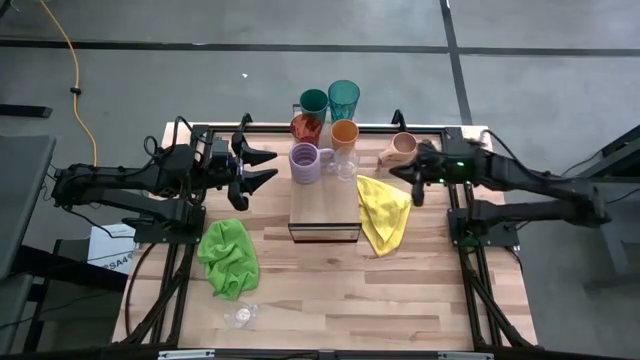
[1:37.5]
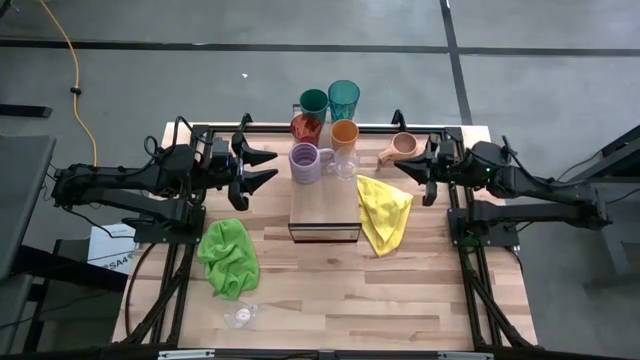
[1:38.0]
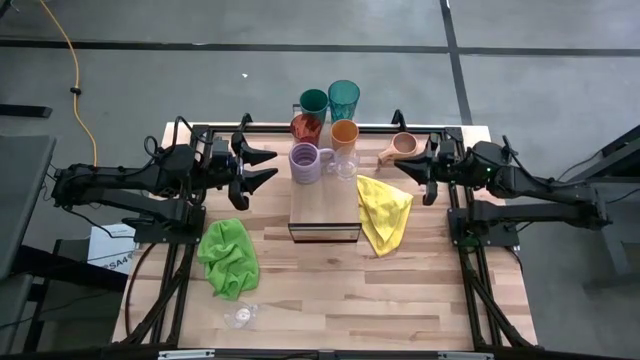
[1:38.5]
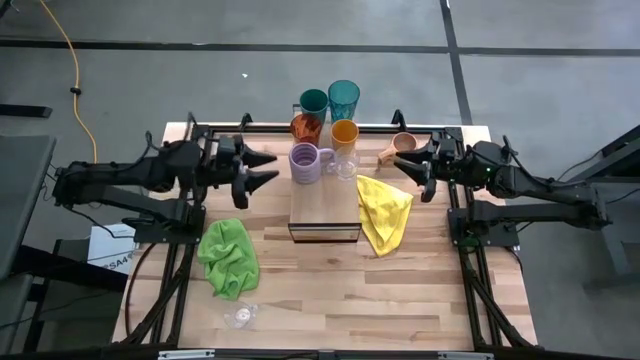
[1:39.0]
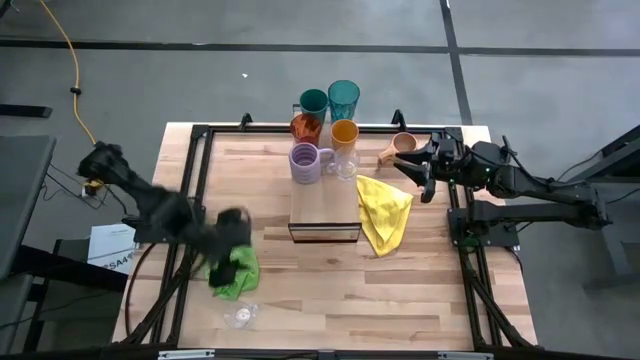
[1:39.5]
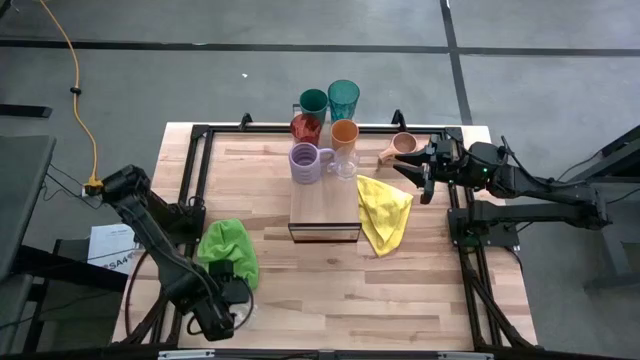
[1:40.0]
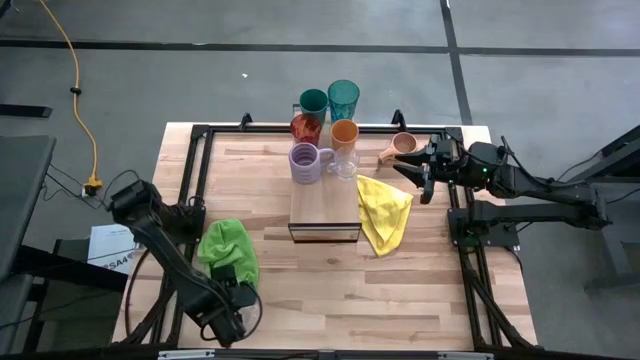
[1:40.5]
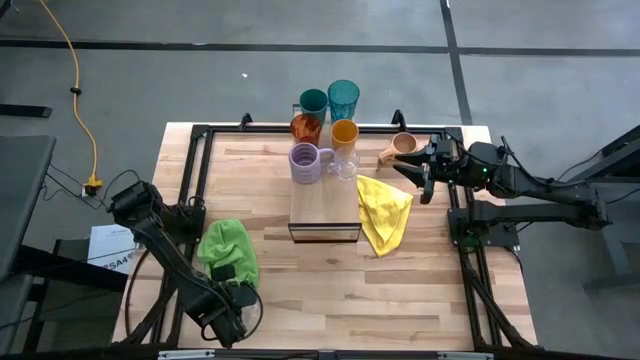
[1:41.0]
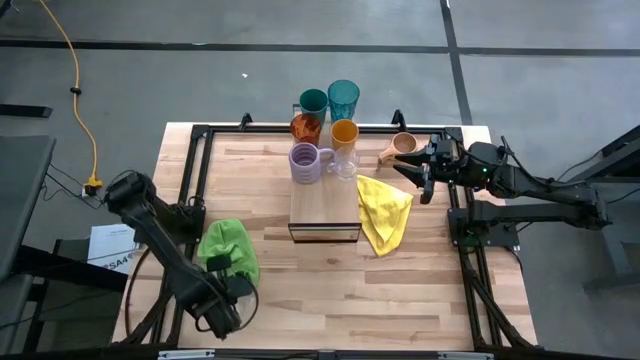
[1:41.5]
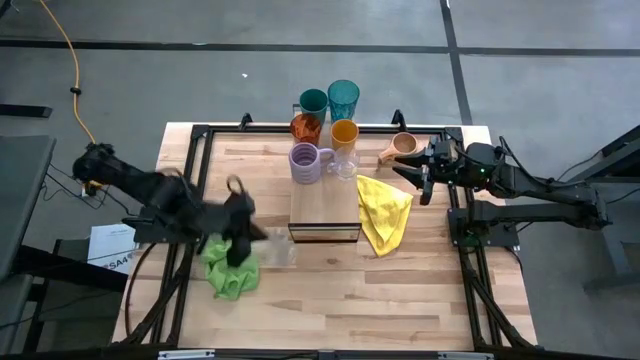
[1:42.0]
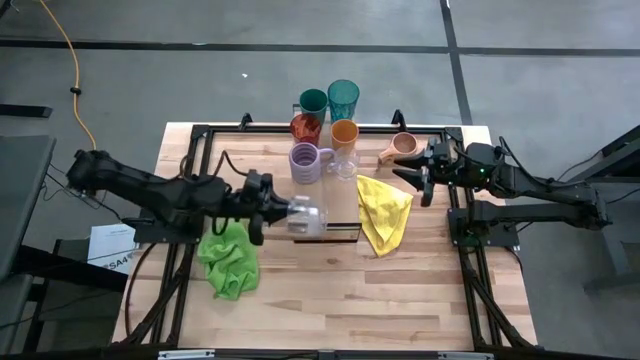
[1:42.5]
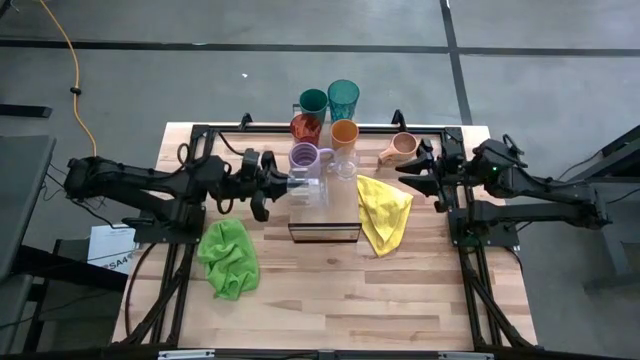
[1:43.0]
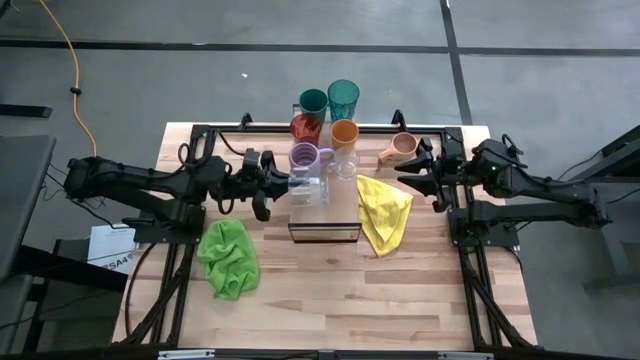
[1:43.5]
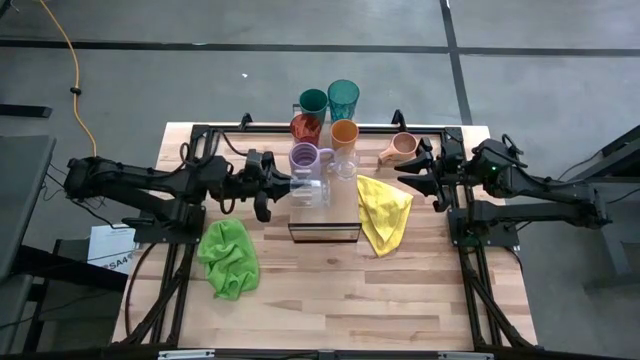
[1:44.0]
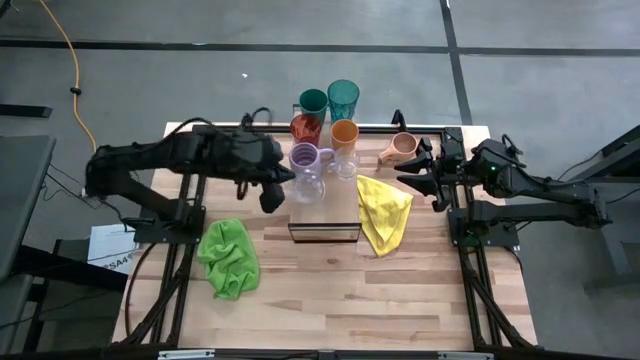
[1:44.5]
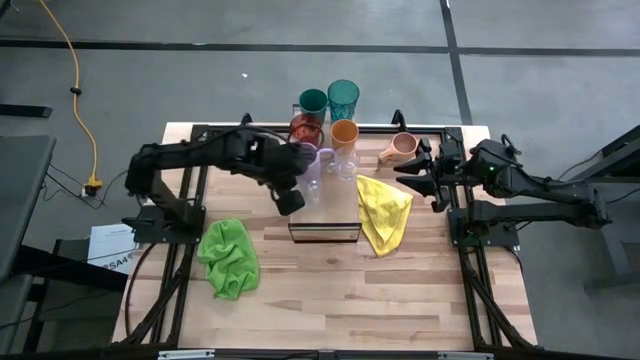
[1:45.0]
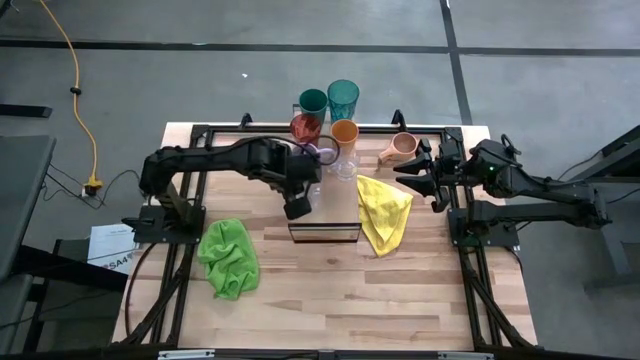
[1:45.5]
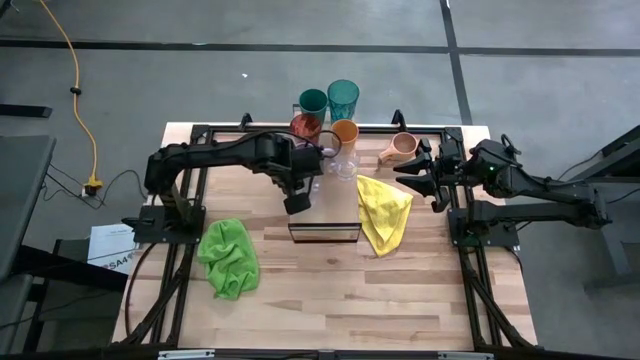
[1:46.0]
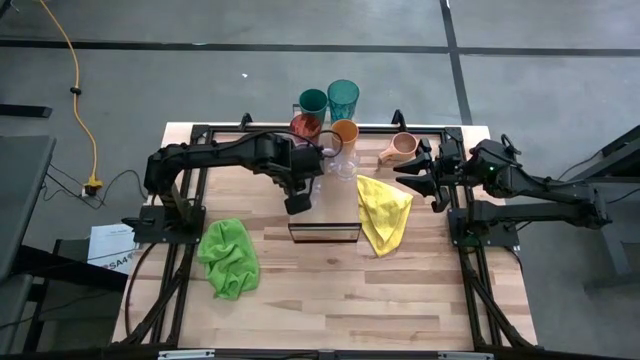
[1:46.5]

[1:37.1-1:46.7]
Task: Stack small to large cups/mugs on shelf
Put the transparent cup on the shelf

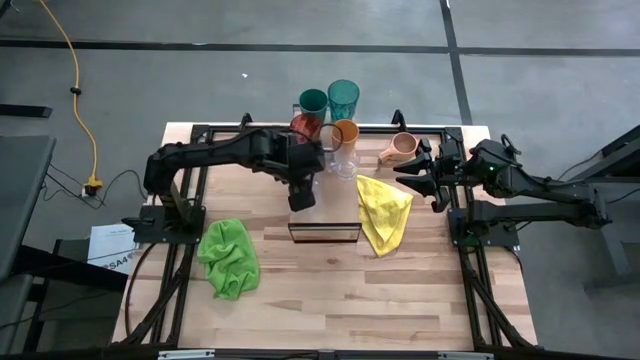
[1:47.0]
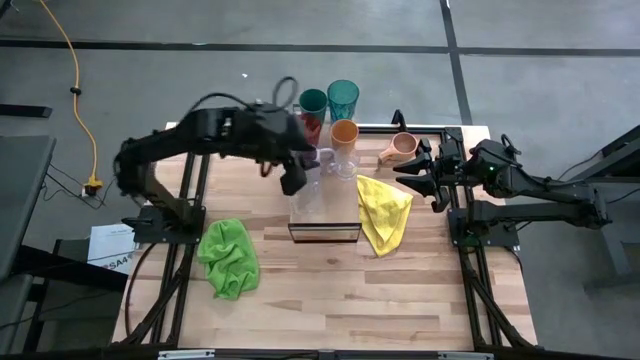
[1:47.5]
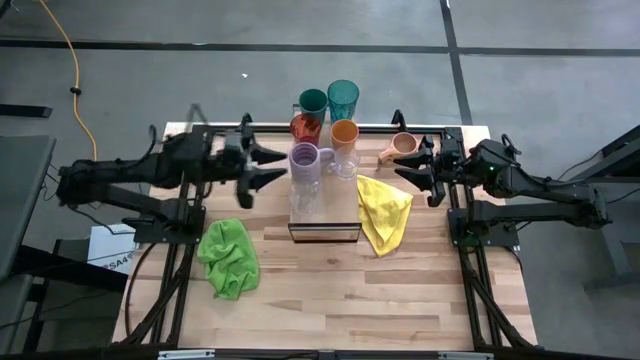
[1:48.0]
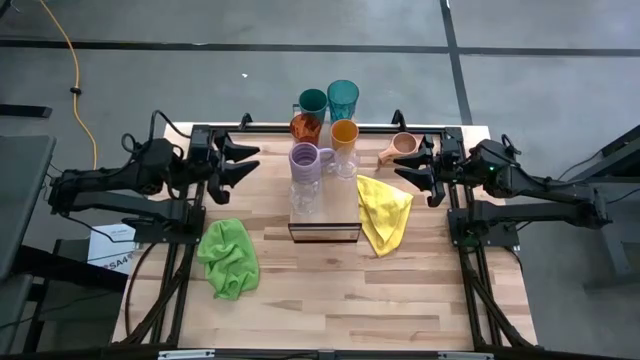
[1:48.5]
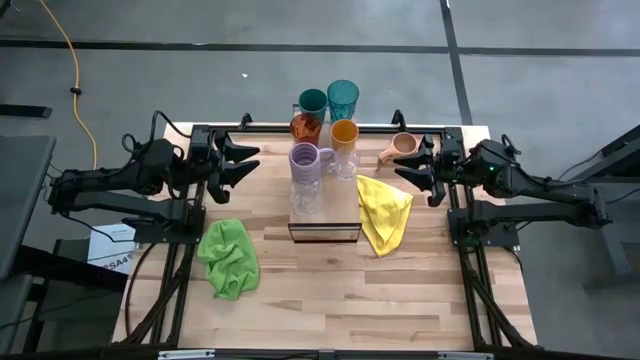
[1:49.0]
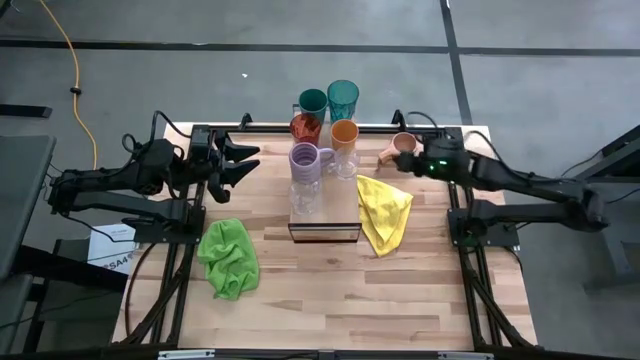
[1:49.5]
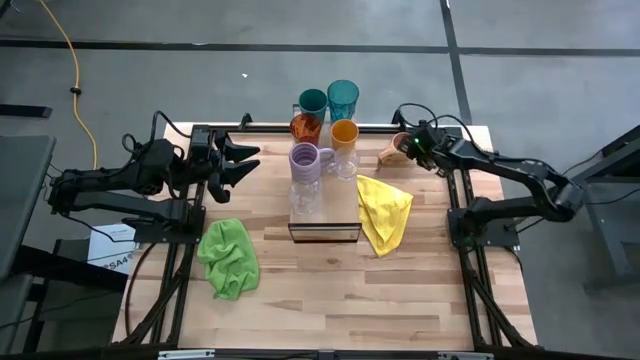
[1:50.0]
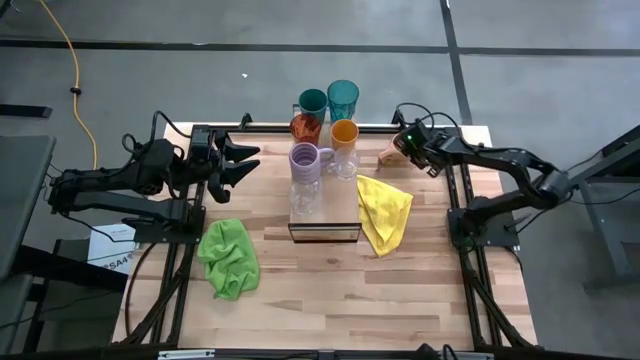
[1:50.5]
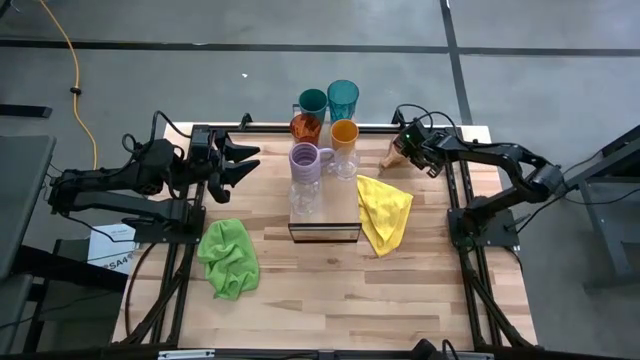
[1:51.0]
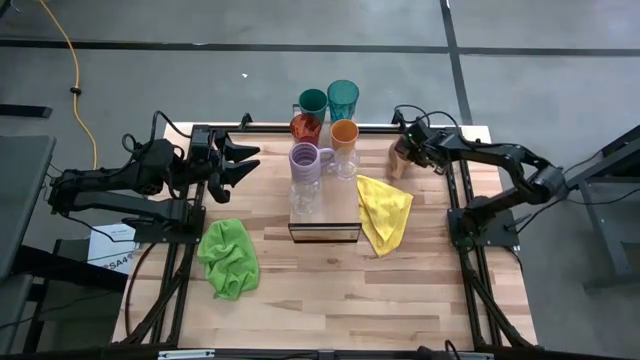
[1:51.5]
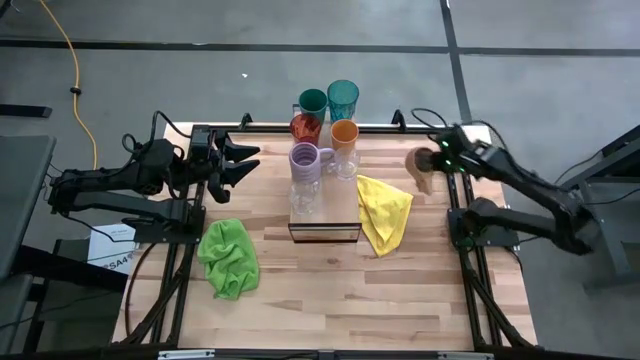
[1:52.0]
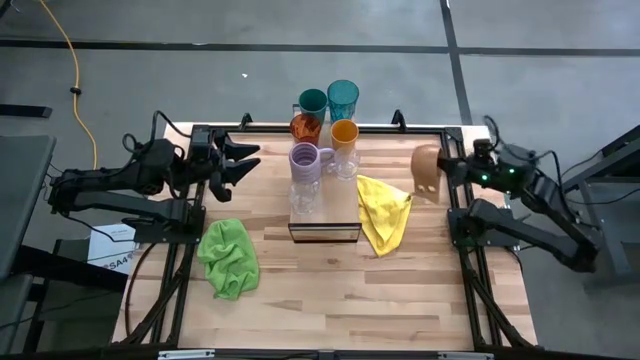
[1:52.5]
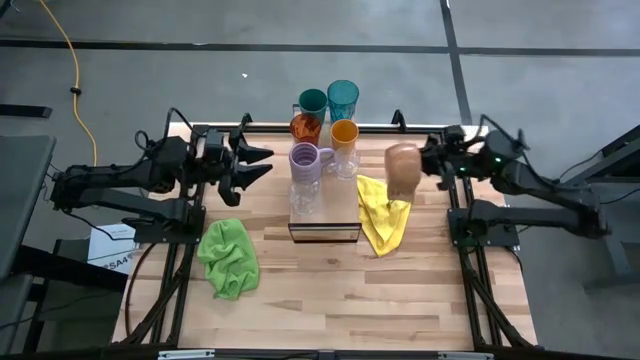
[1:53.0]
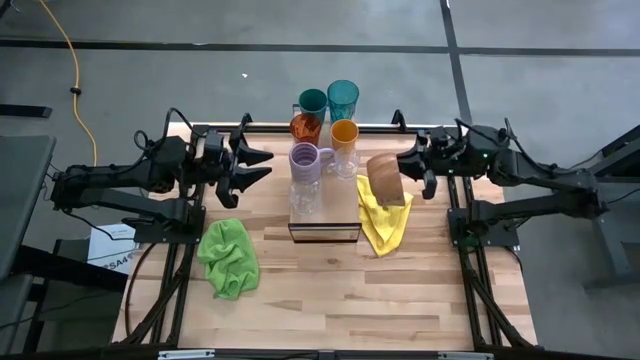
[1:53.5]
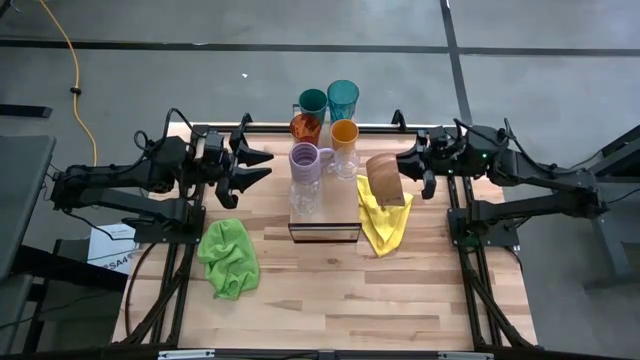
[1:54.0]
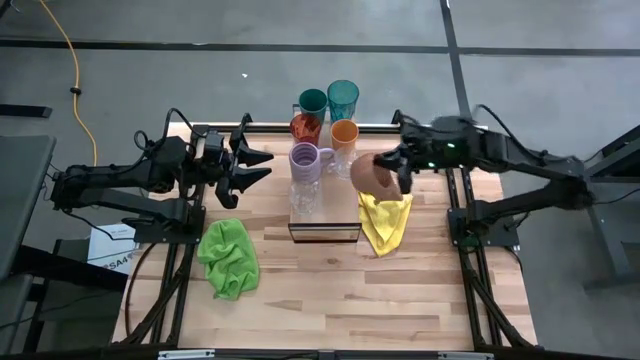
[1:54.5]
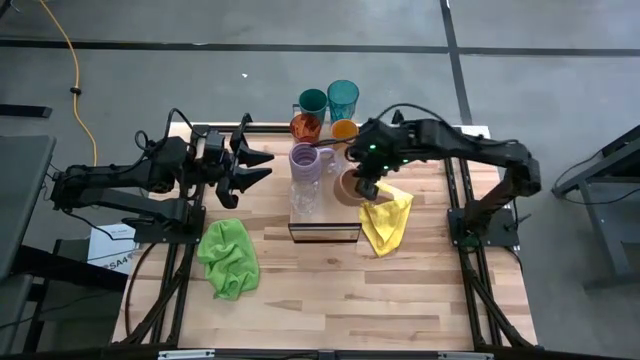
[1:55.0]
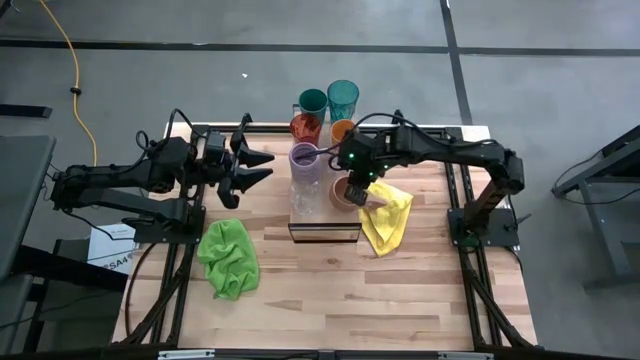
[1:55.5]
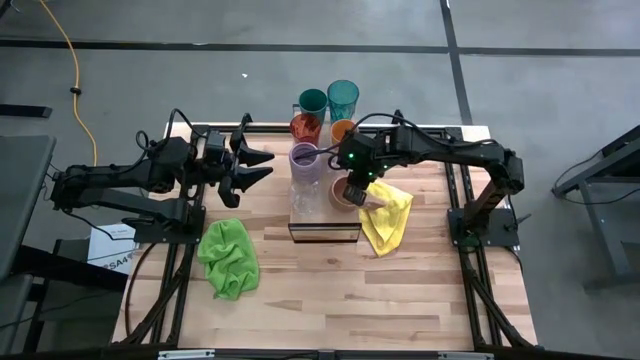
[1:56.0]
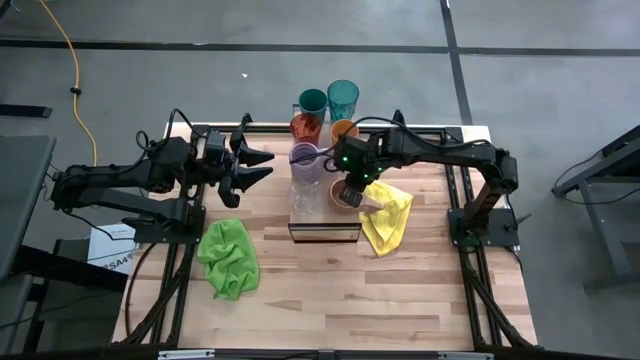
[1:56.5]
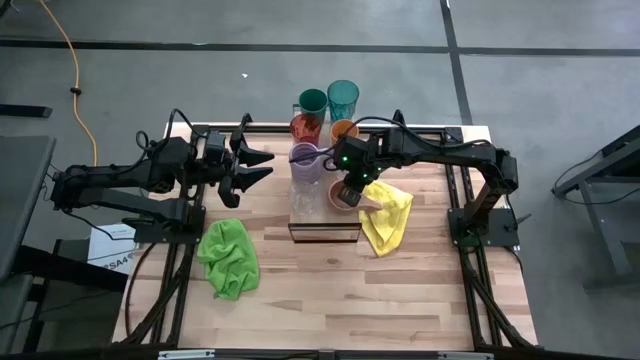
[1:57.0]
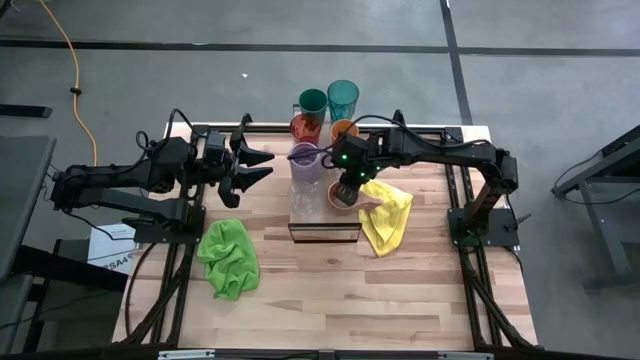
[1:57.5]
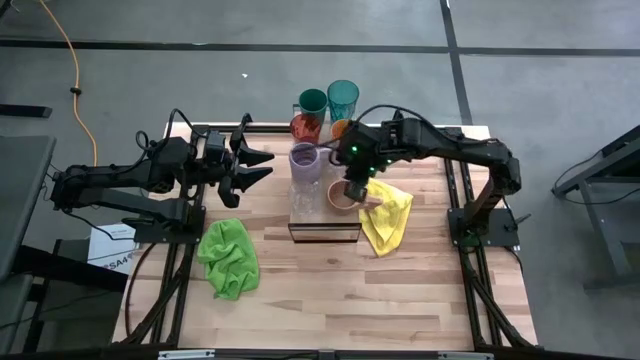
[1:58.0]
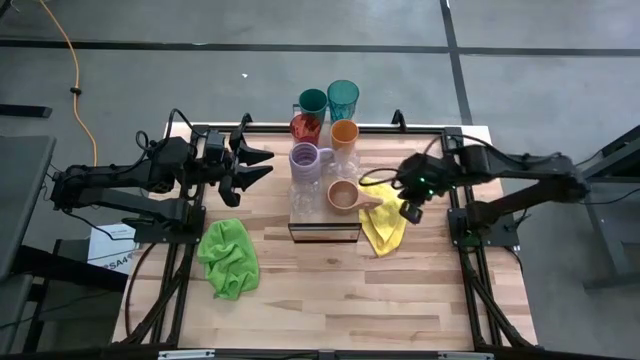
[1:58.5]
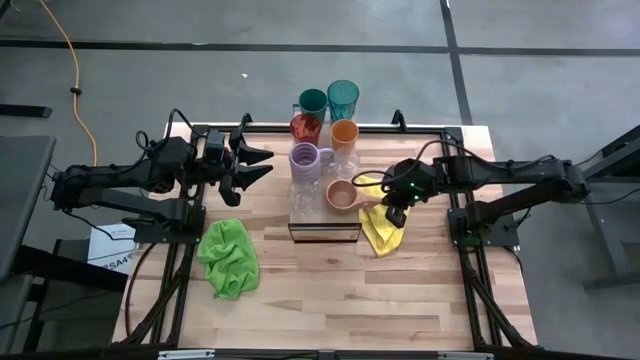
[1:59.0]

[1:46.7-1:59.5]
Put the brown mug on the shelf
